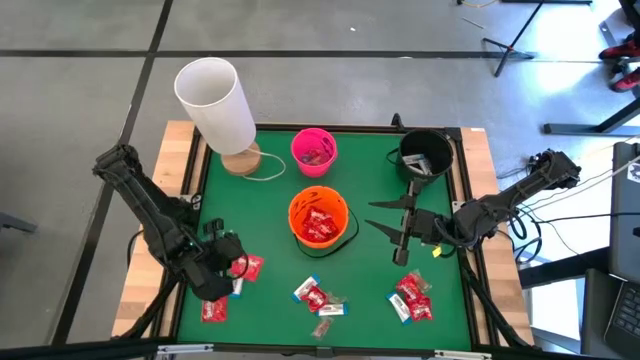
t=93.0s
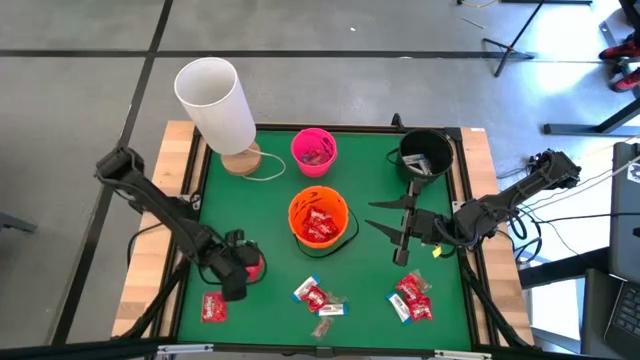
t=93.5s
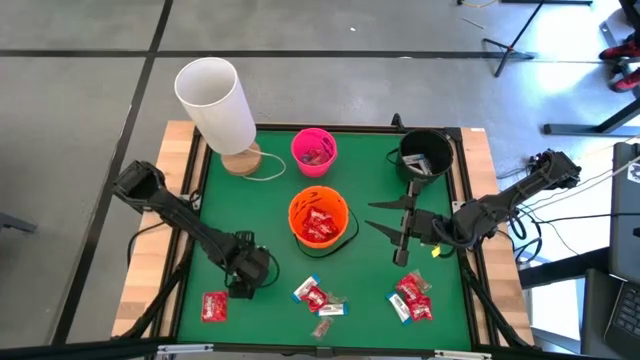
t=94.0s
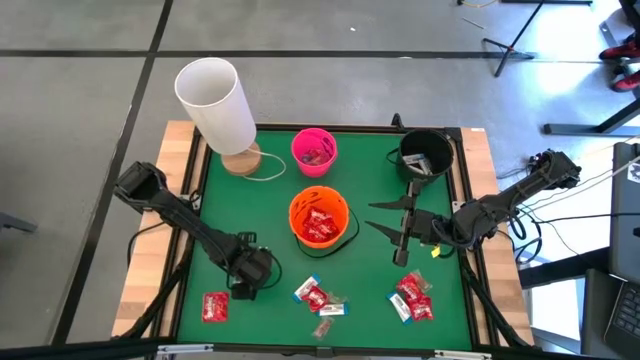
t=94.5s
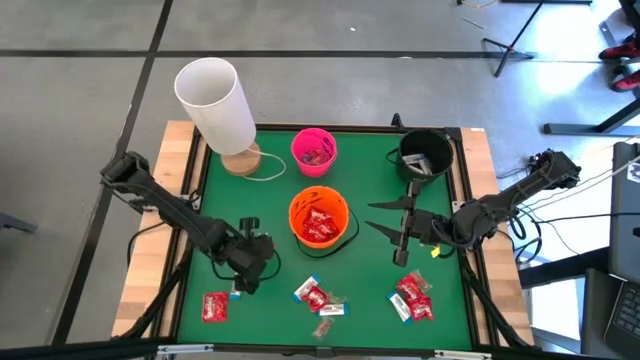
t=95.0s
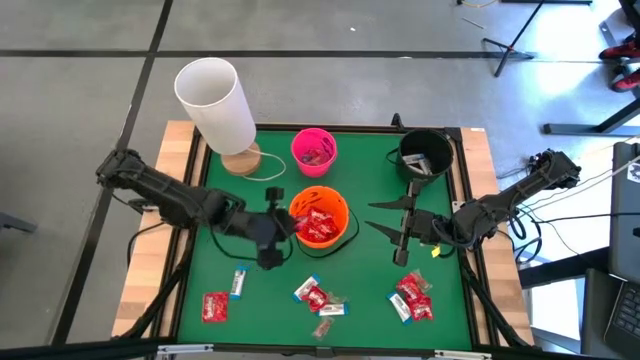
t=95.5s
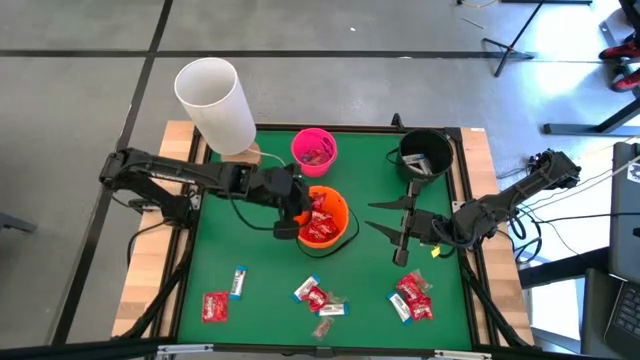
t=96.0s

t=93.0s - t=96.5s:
Task: Sort candy
Put the red candy into the orange bucket

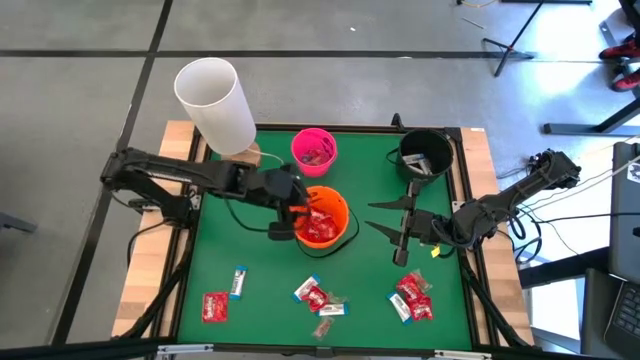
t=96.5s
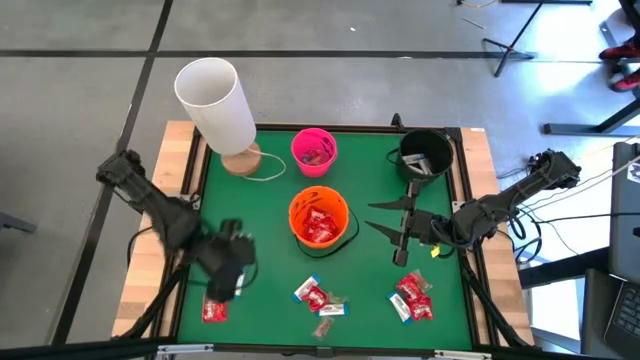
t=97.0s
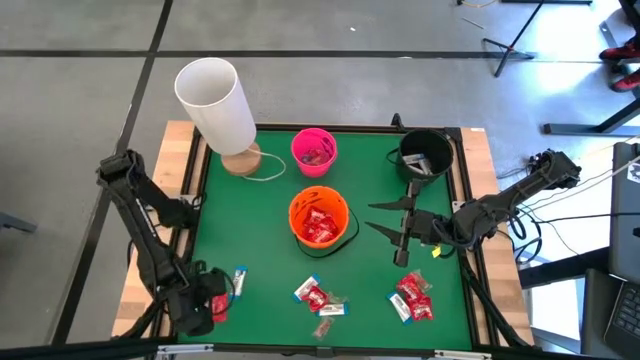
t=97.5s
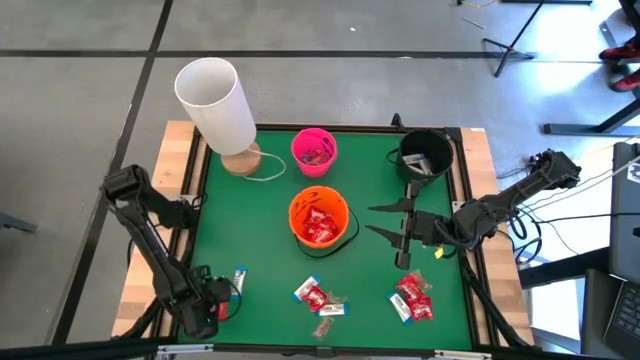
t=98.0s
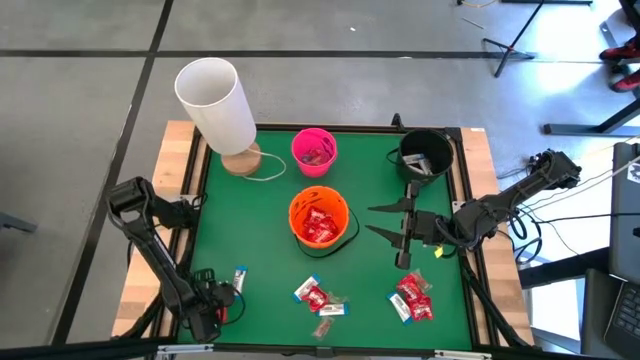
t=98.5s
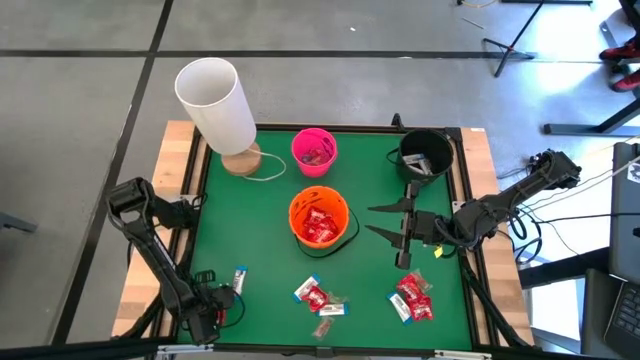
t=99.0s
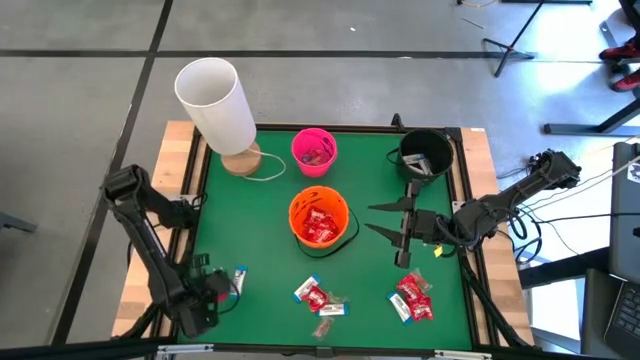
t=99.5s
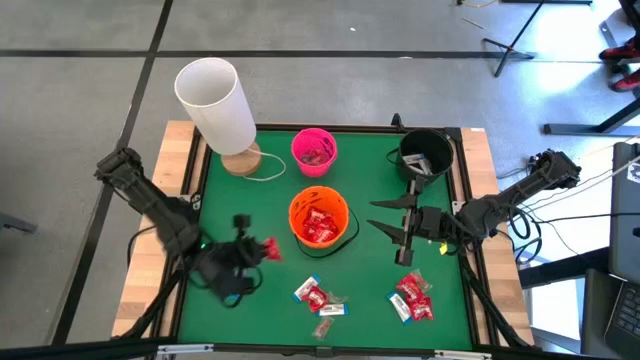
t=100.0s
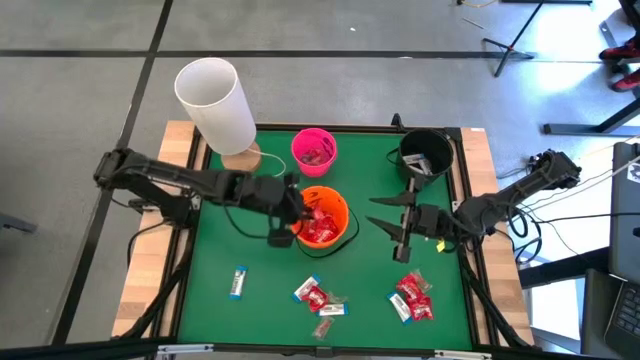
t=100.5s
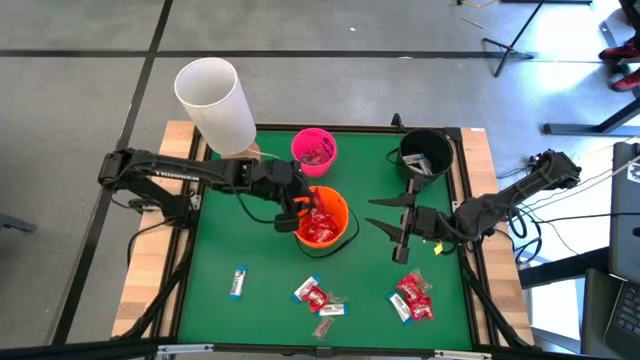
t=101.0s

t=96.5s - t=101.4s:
Put the red candy into the orange bucket

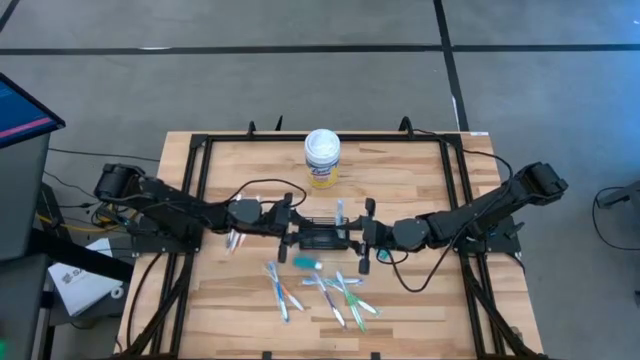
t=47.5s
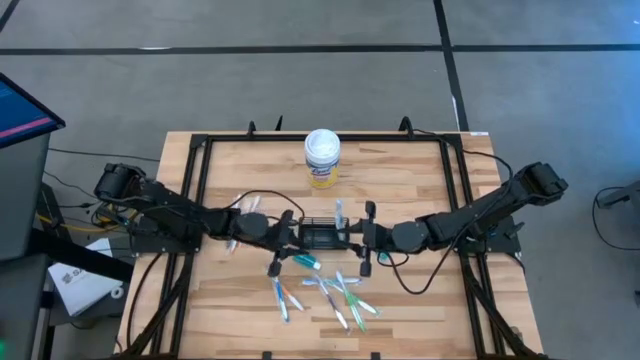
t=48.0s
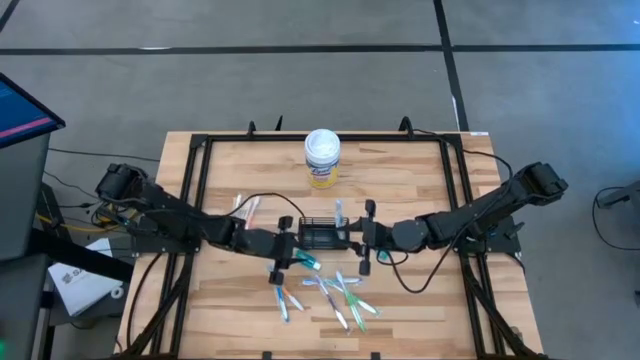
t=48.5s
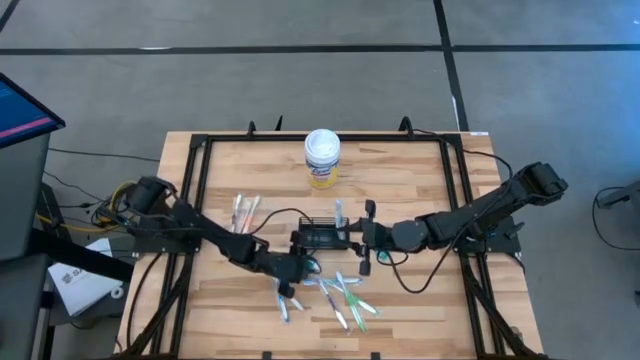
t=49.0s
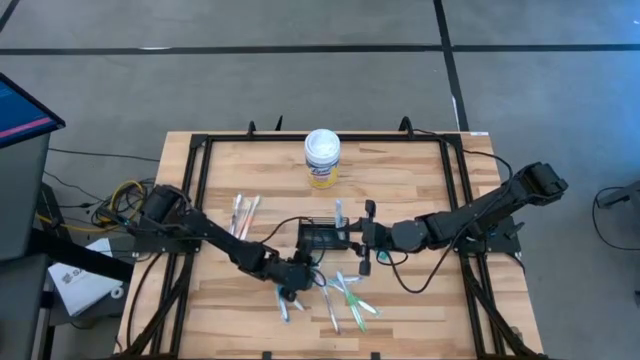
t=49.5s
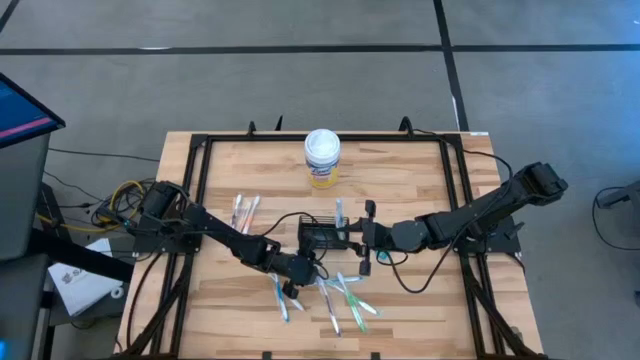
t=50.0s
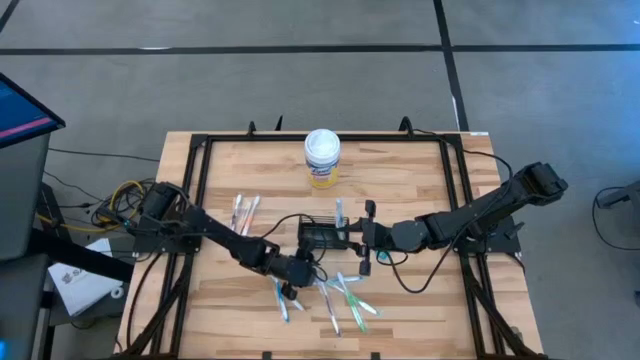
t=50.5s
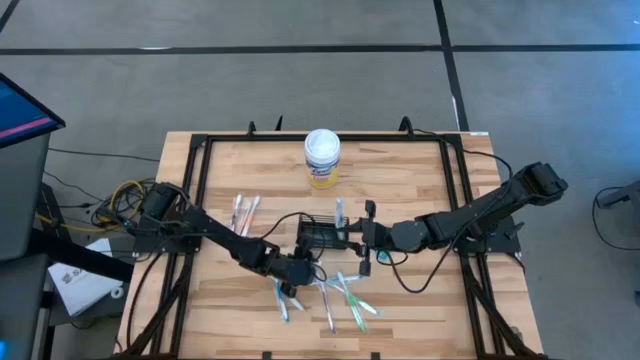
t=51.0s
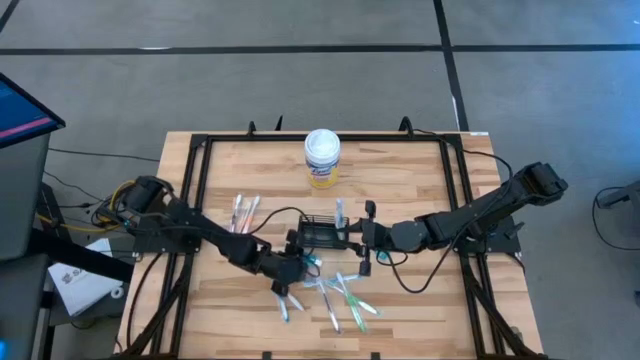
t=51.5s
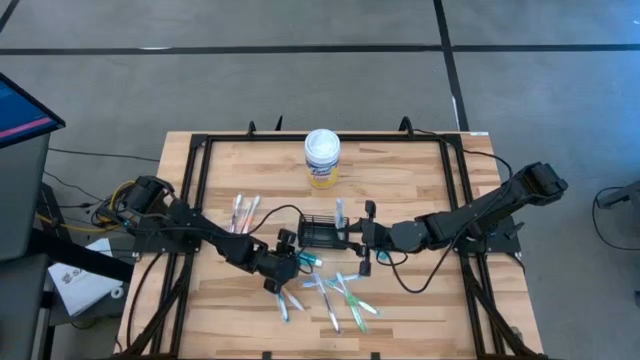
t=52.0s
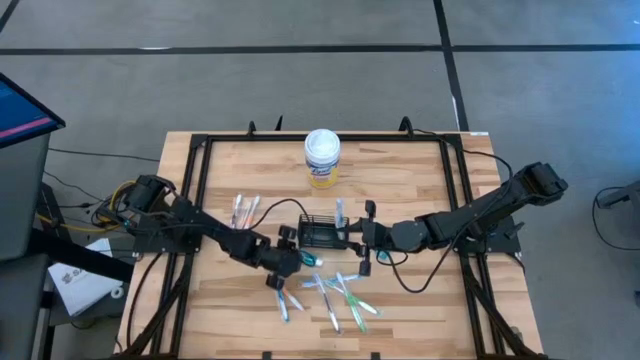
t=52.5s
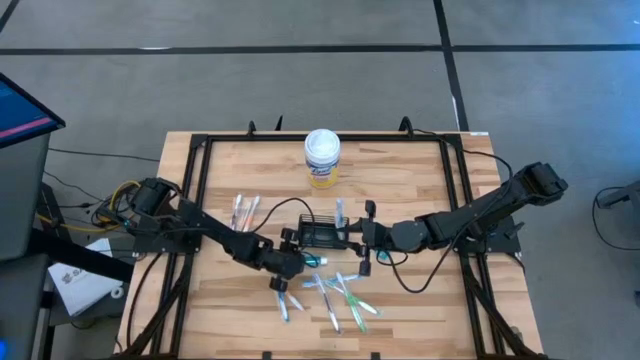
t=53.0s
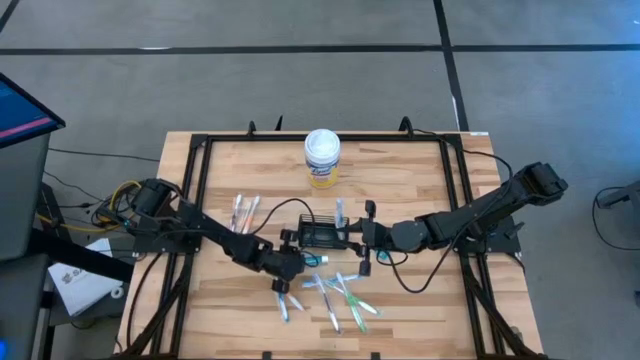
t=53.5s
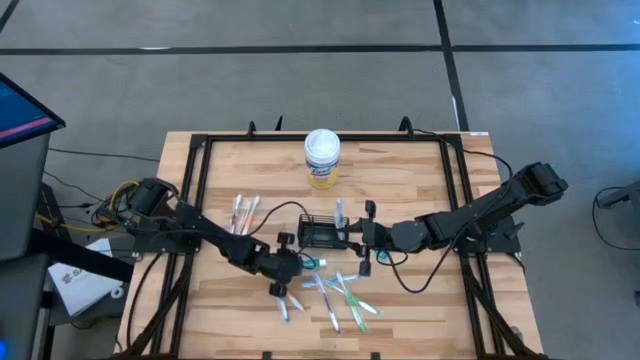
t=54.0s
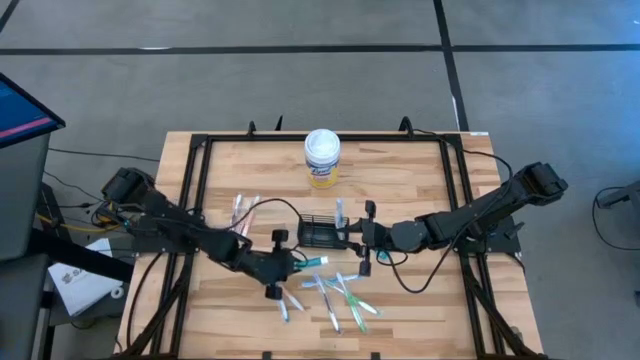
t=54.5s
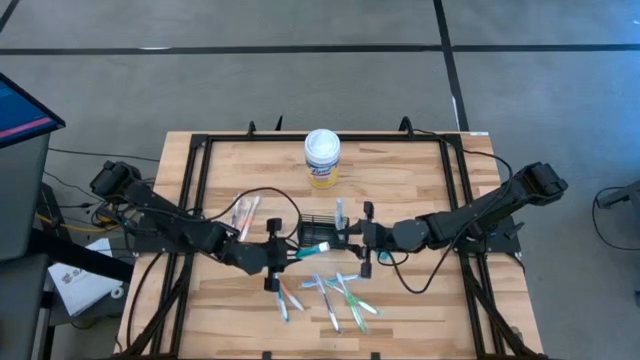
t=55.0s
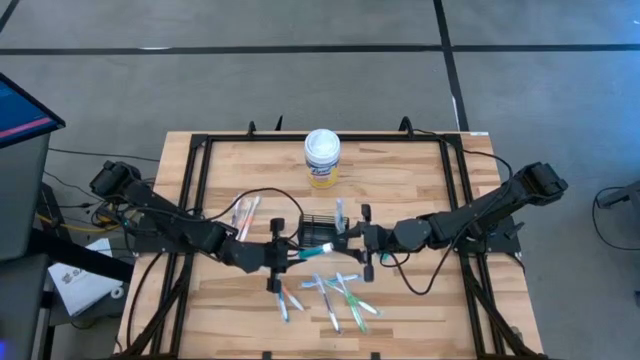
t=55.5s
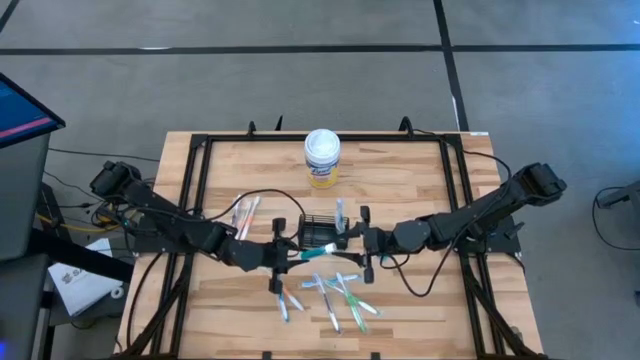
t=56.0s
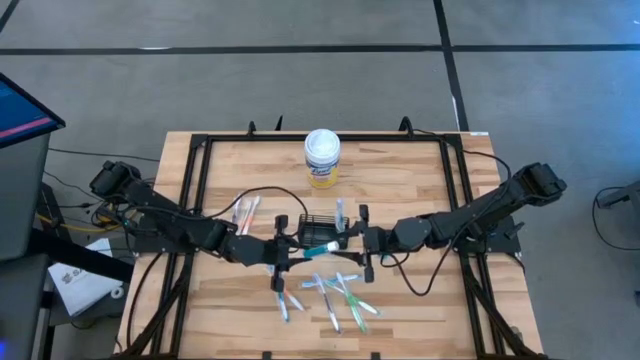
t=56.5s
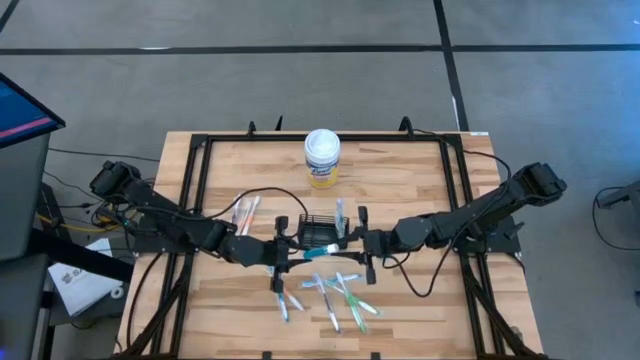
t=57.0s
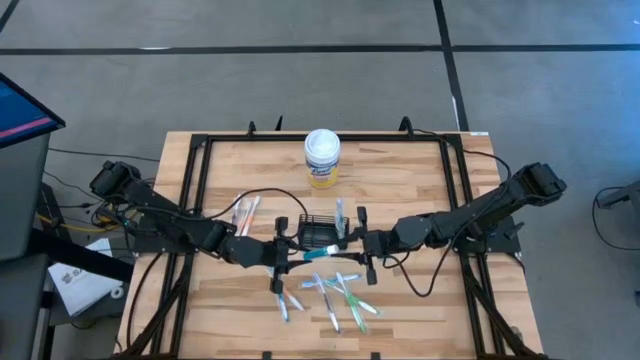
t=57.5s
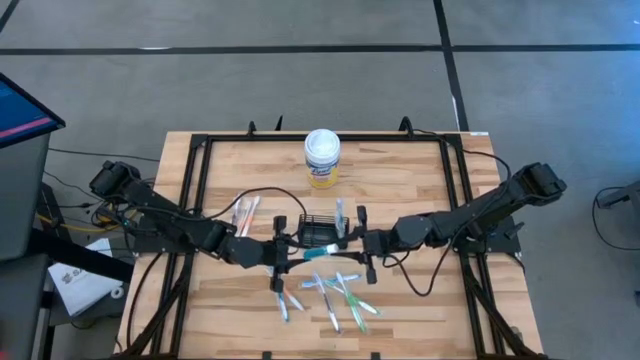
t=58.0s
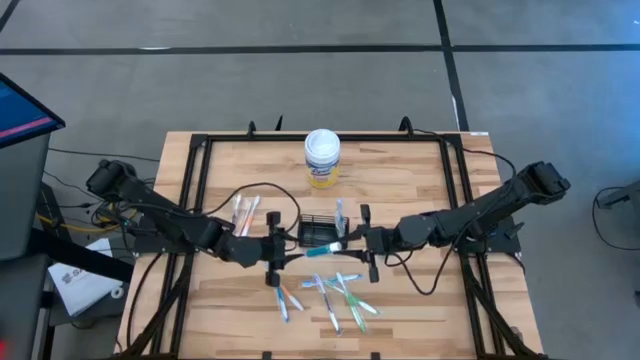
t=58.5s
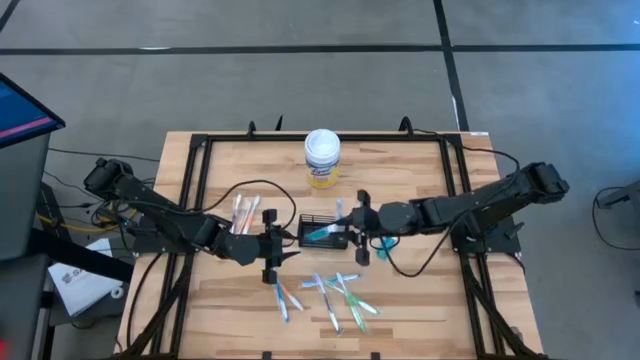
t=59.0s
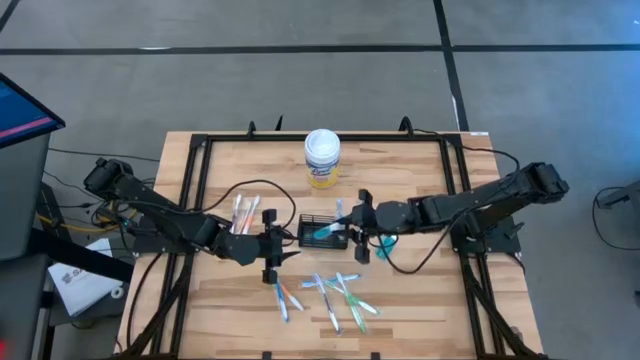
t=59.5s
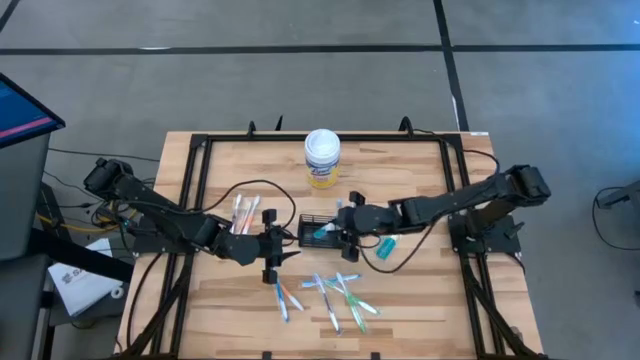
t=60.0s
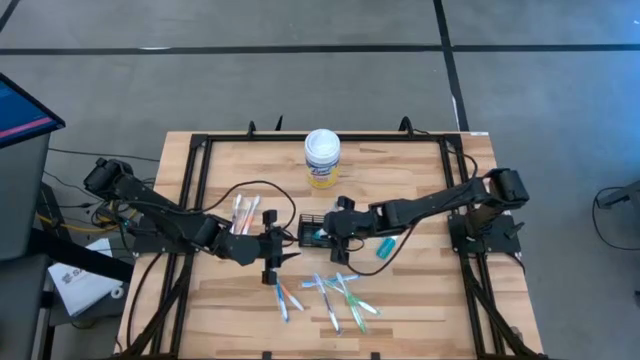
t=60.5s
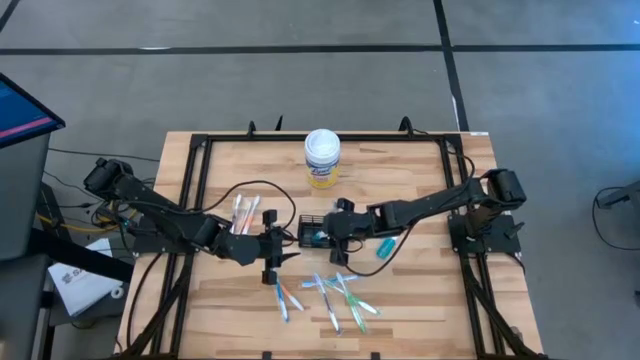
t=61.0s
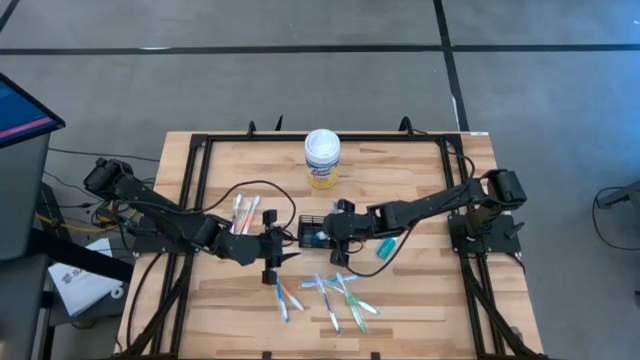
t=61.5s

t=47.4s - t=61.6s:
Task: Pick & Place toothbrushing station
Put the top blue mouthwash into the black mesh organizer
